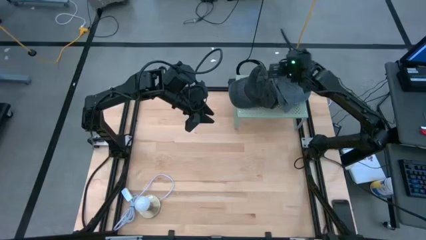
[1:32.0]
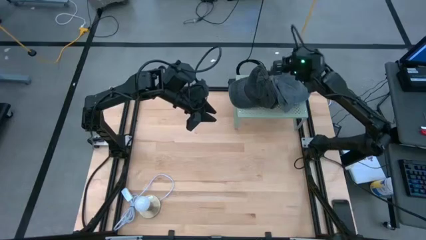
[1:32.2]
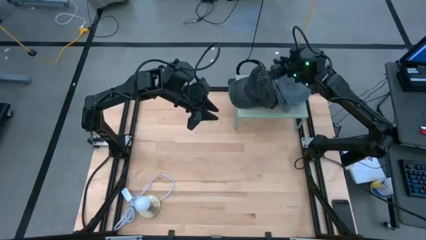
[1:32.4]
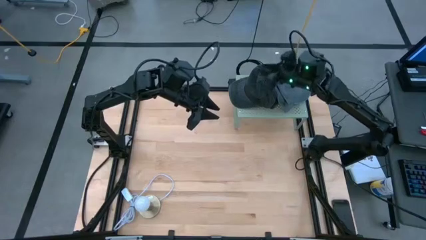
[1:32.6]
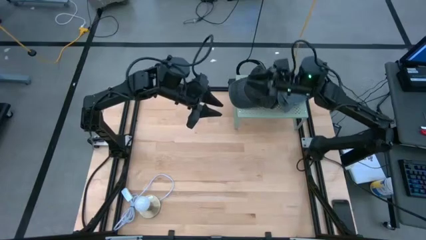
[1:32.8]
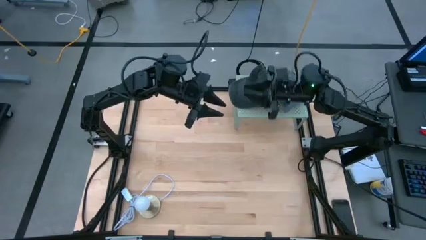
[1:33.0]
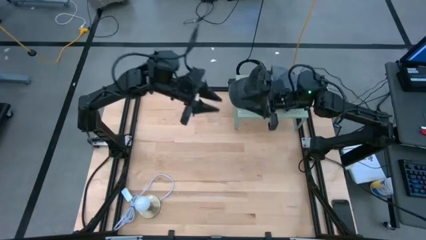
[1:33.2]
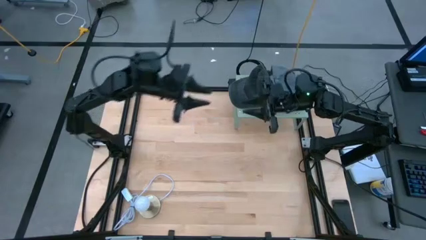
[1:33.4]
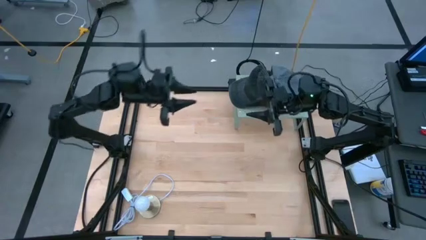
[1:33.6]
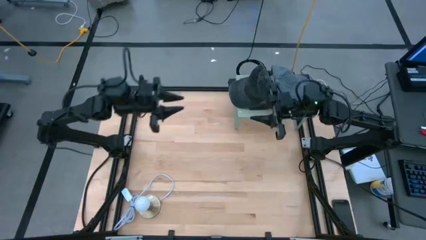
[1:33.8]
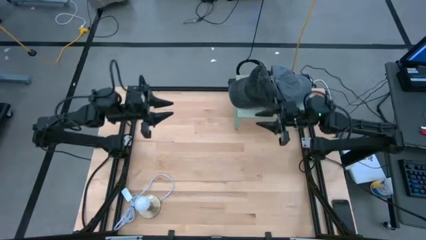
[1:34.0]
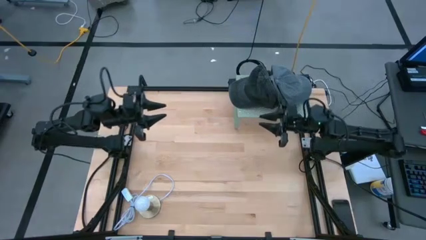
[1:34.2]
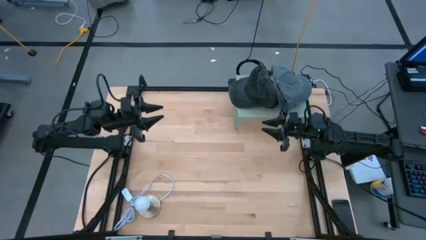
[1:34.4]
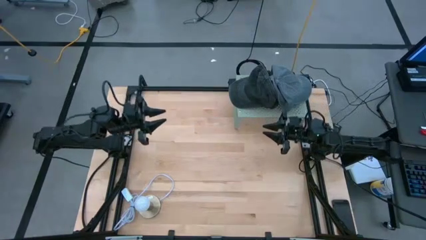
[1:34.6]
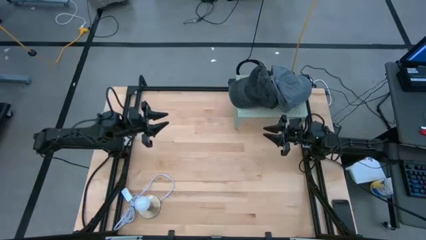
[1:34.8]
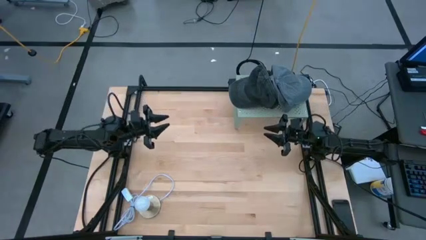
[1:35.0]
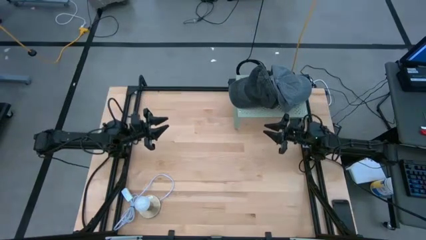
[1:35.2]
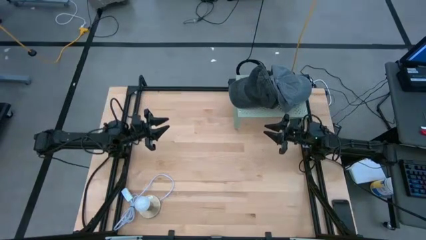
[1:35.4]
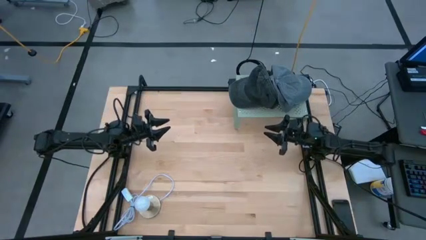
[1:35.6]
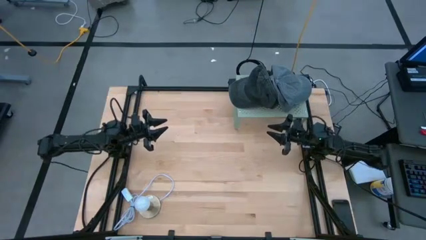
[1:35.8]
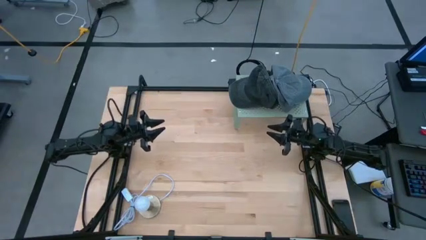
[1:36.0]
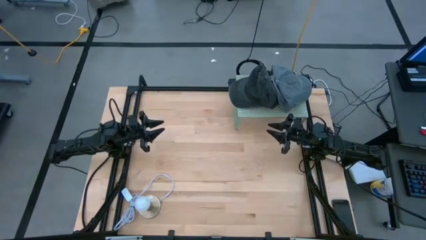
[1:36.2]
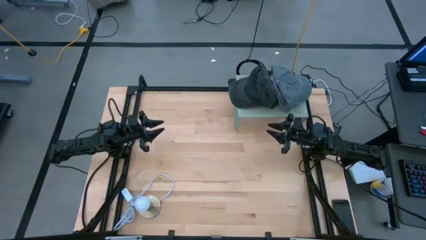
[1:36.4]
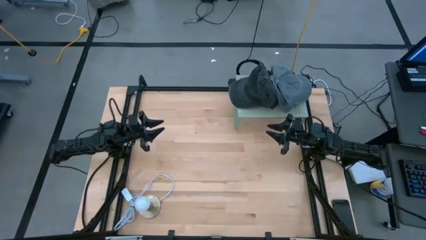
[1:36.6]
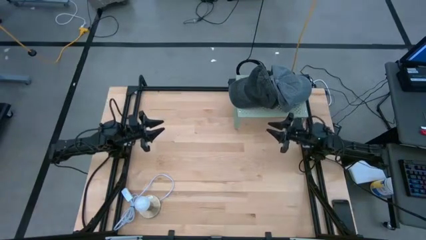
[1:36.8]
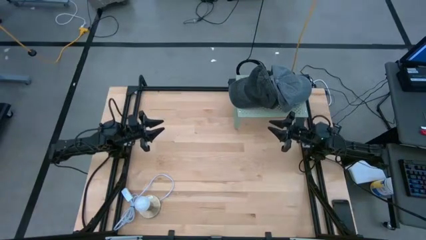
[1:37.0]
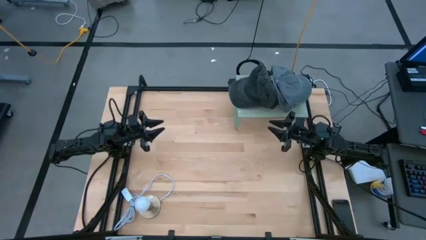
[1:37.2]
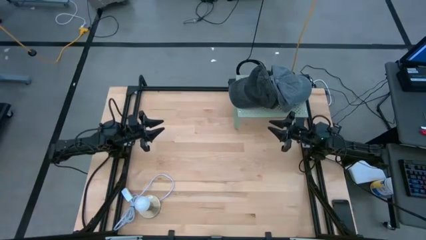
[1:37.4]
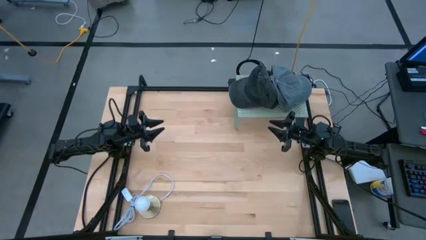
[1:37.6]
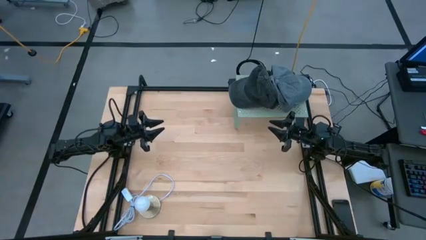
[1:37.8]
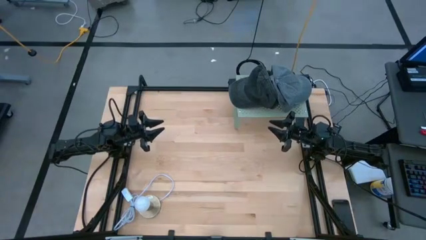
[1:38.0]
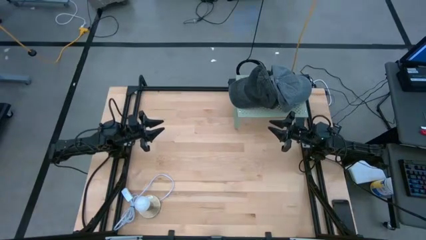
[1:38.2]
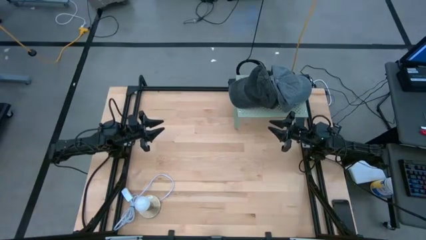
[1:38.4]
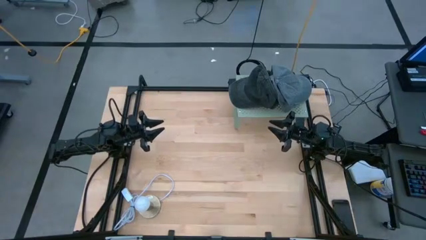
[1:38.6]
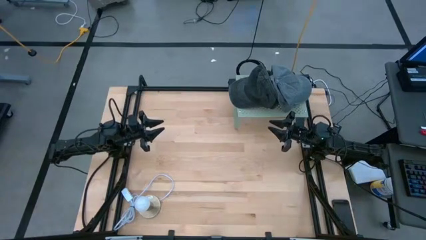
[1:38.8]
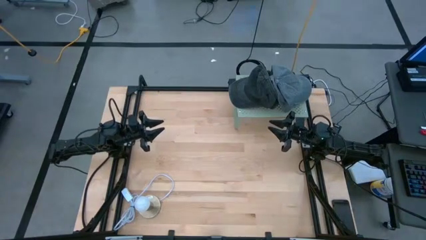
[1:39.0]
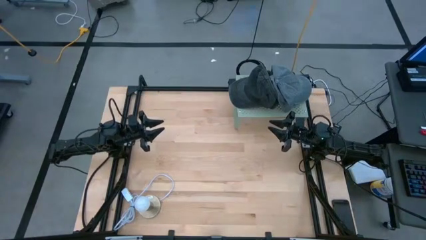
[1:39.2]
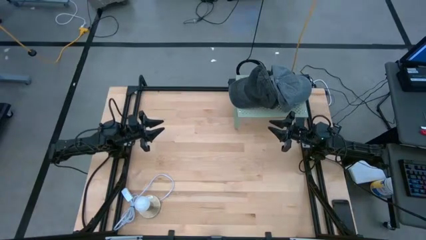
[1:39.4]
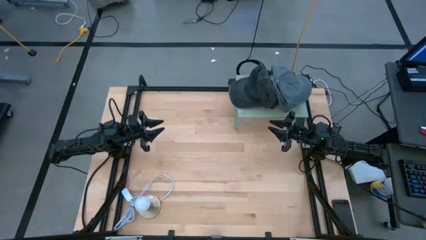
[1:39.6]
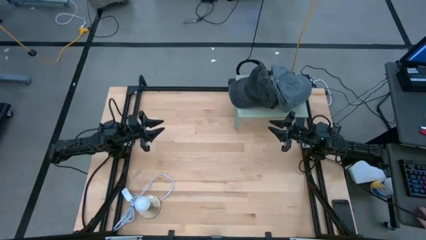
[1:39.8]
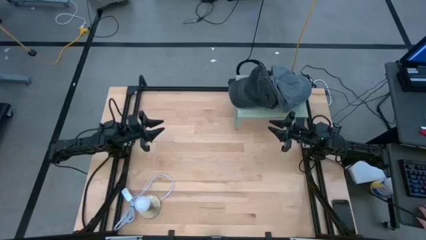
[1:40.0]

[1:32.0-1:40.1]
Task: Pick & Place hat
Return to Home Position

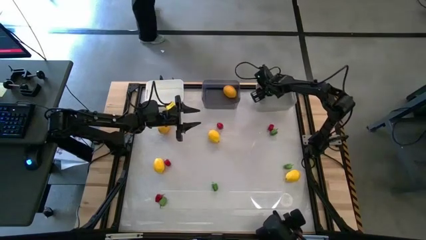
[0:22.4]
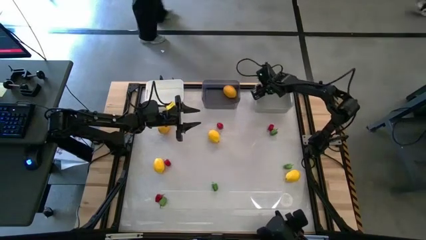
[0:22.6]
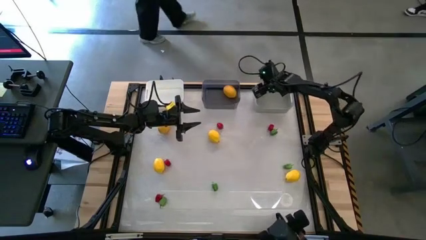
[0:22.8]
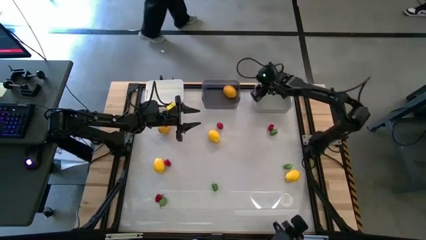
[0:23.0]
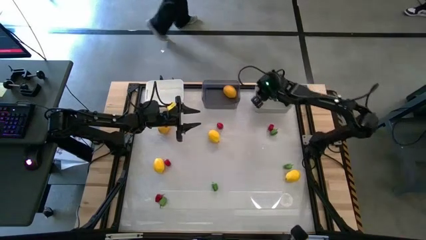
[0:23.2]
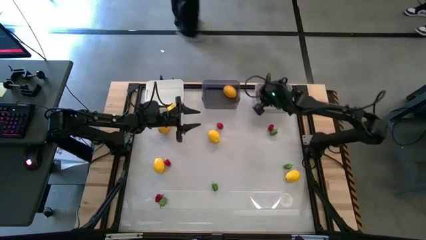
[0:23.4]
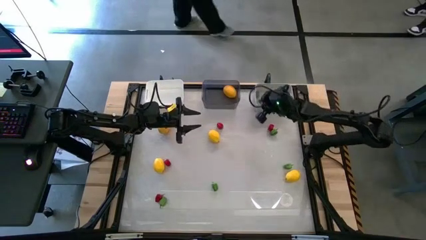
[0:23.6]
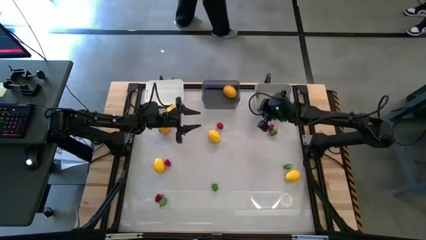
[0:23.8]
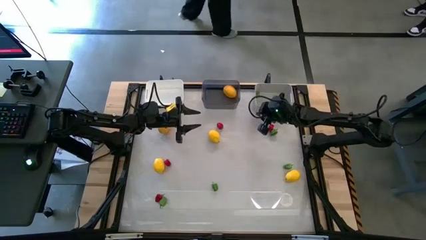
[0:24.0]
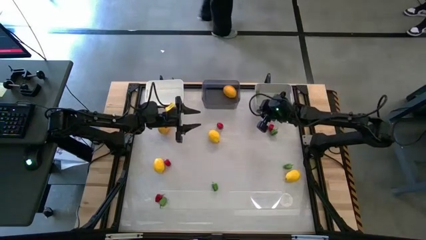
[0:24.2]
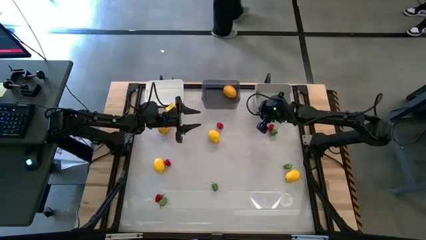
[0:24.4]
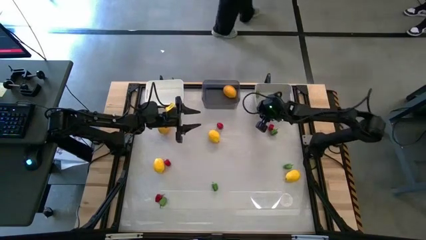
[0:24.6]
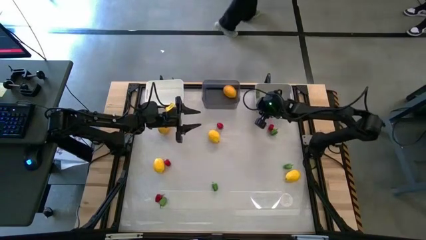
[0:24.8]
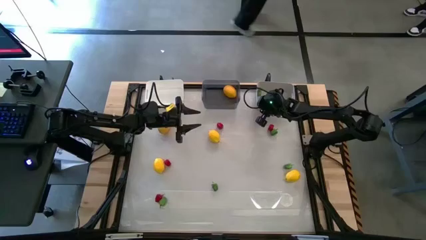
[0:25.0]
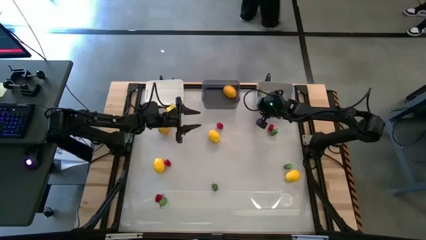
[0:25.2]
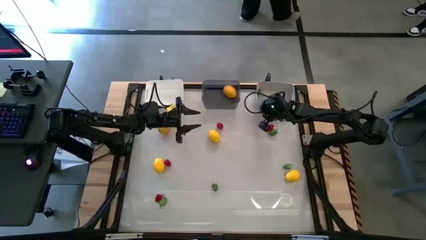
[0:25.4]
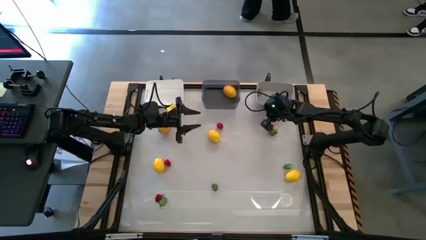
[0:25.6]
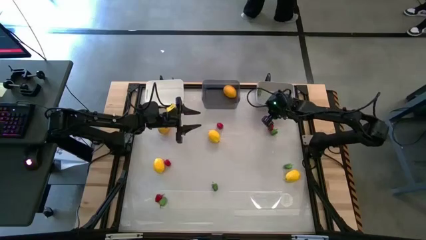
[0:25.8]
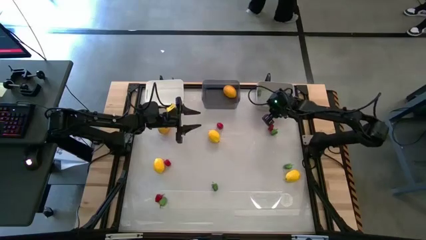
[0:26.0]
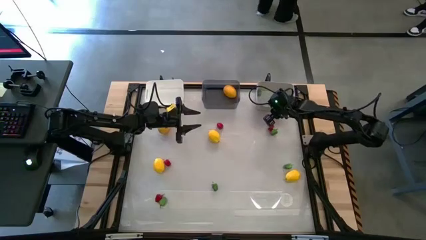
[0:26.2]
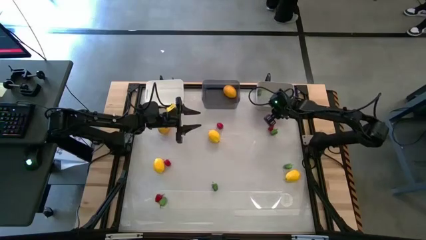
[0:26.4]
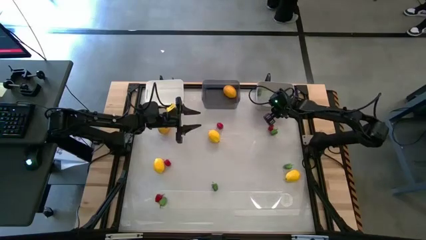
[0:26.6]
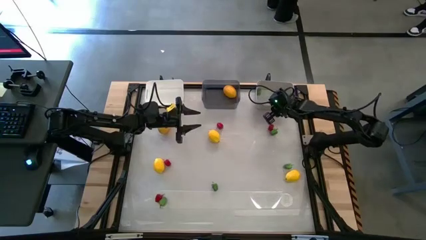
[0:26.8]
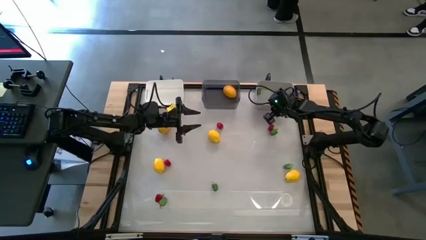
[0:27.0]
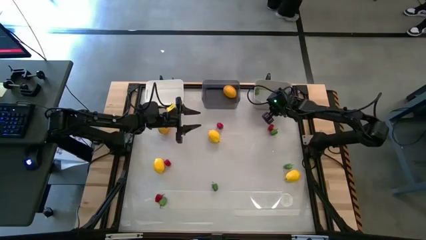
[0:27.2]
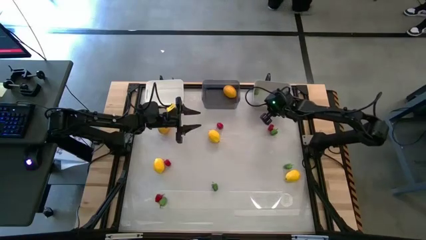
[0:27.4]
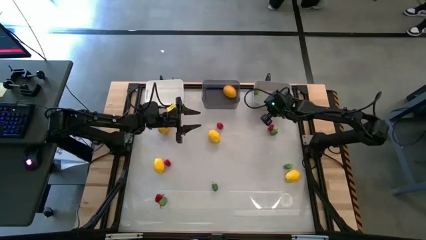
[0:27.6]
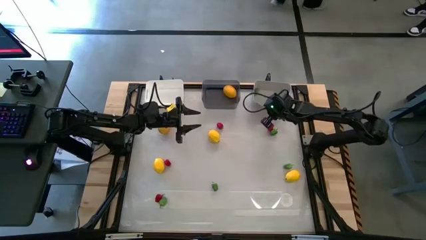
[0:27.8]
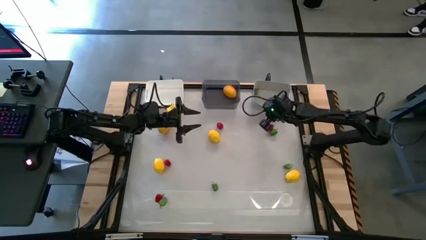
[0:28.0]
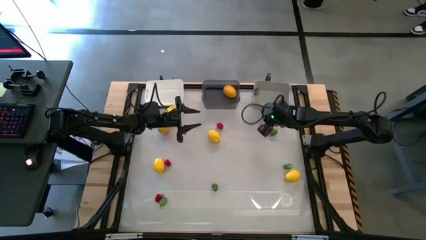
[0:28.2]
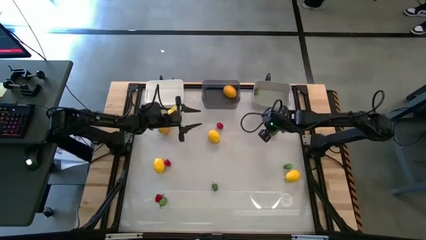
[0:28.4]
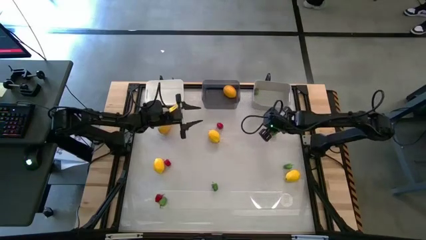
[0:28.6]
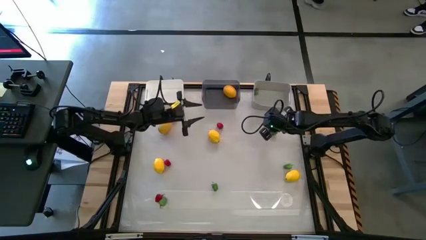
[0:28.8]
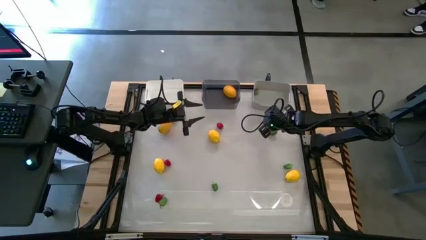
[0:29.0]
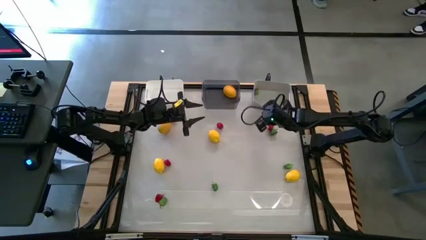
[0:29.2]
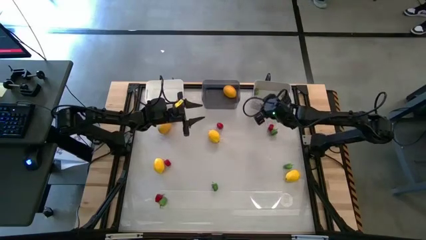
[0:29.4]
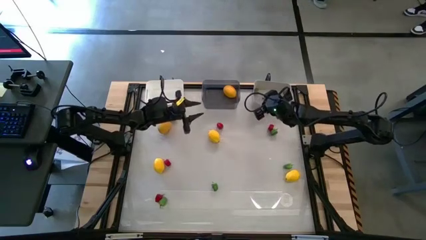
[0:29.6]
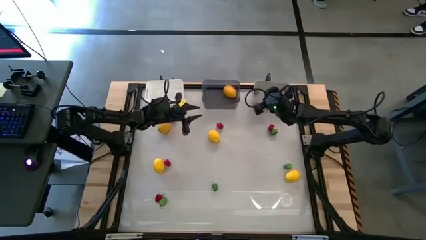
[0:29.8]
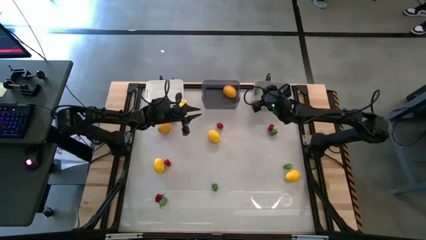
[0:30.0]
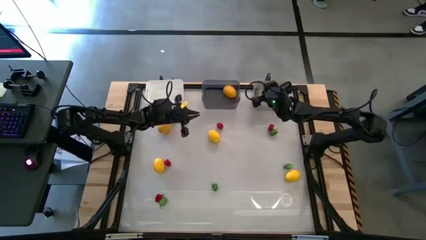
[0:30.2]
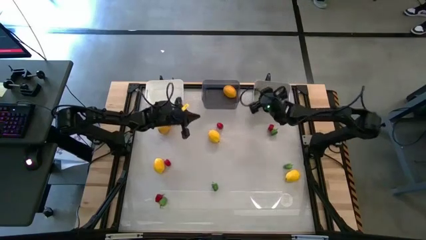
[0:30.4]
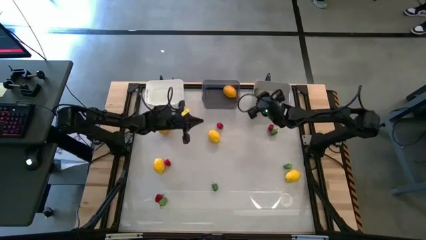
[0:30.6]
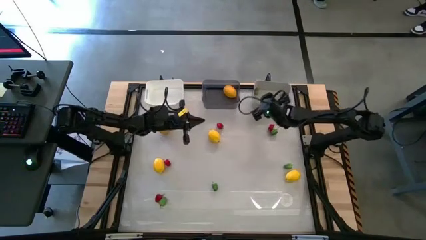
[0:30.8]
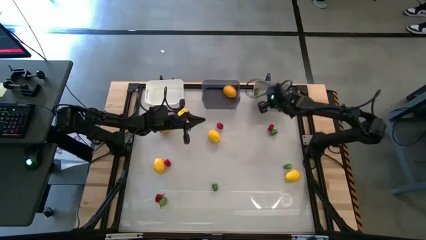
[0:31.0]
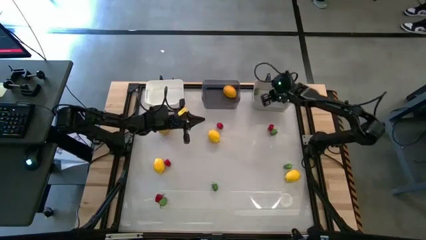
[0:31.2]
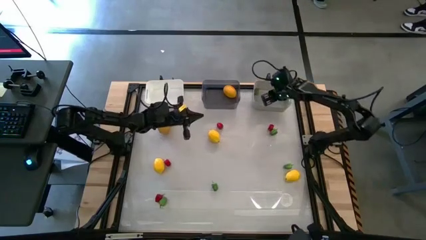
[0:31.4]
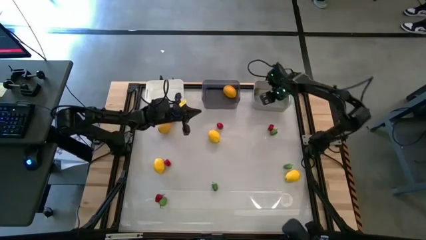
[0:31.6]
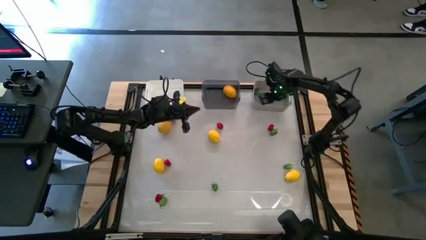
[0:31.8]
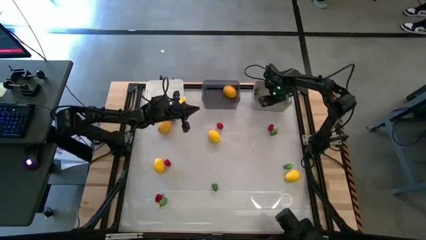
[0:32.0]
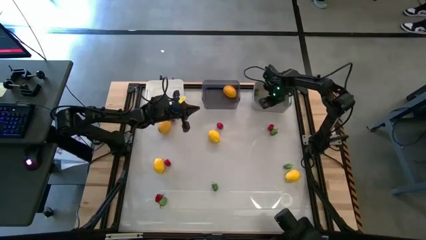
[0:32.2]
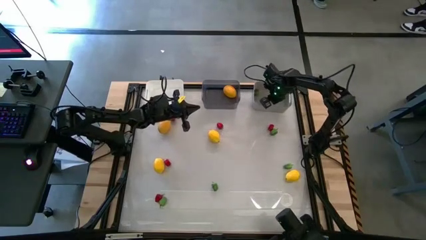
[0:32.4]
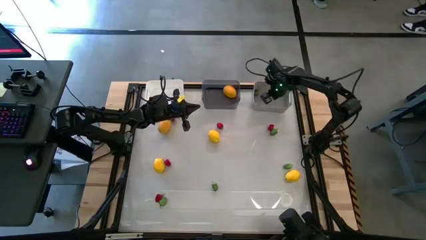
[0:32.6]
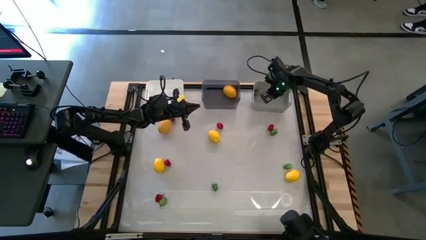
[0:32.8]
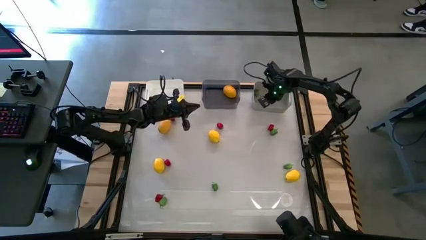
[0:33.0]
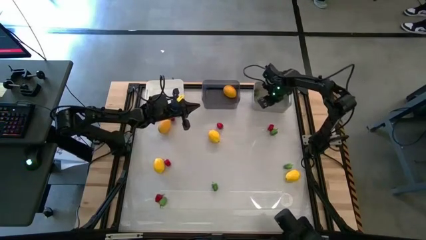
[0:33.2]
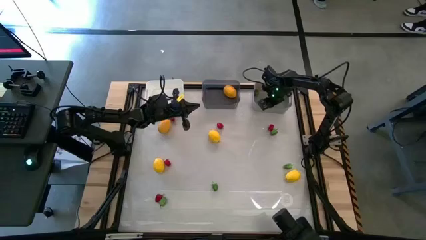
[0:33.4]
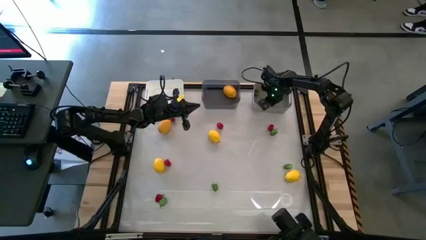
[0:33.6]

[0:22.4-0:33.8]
Task: Sort produce into baskets
Adjust the gray bin
